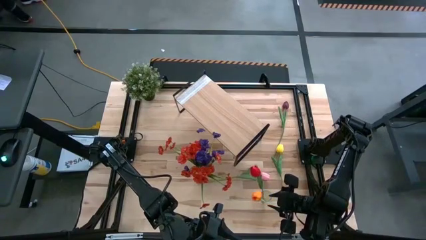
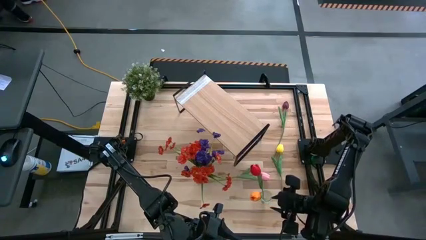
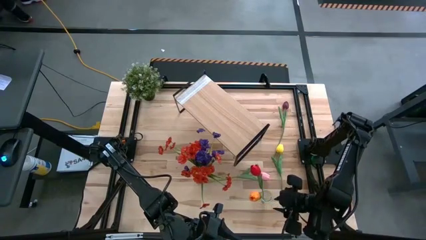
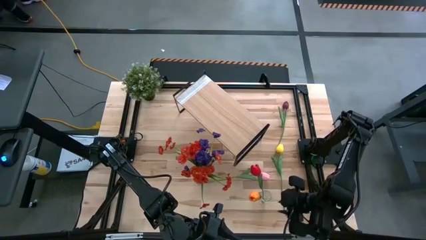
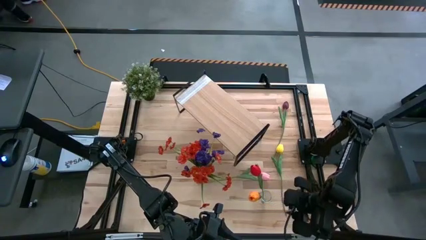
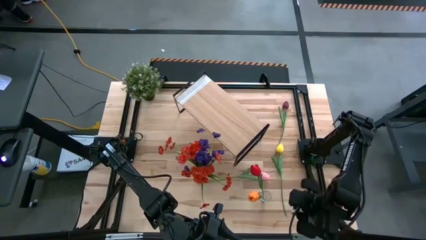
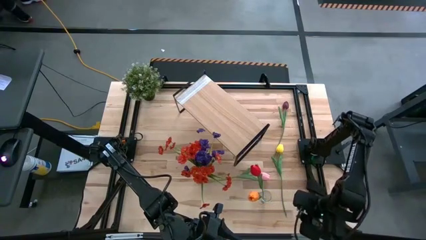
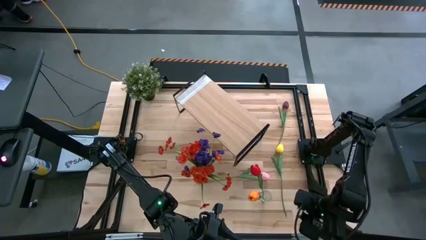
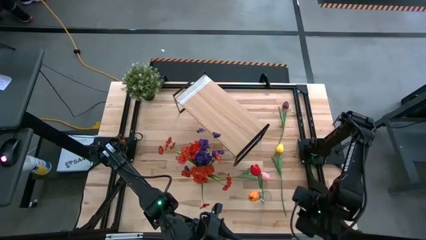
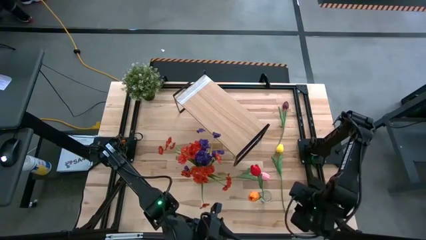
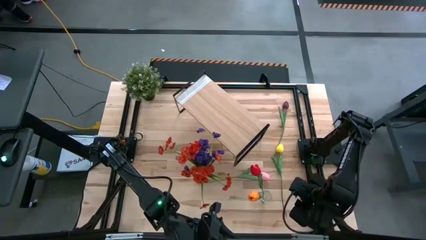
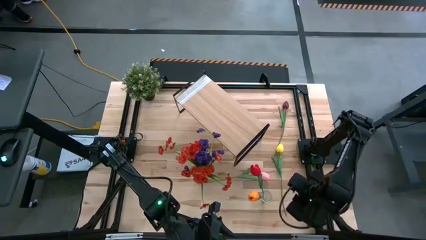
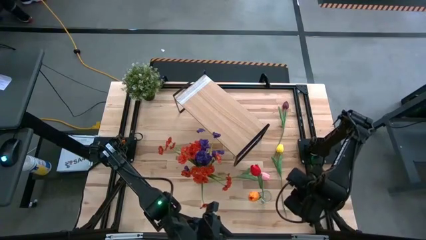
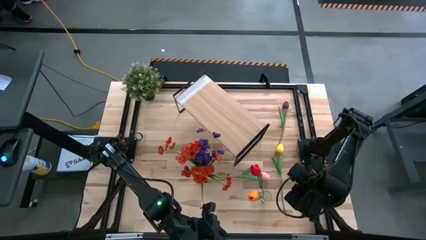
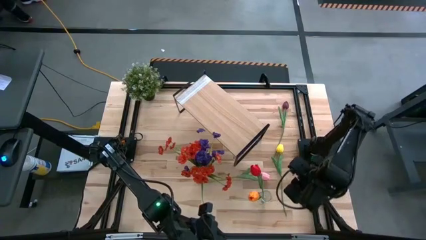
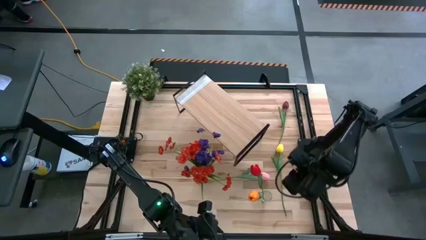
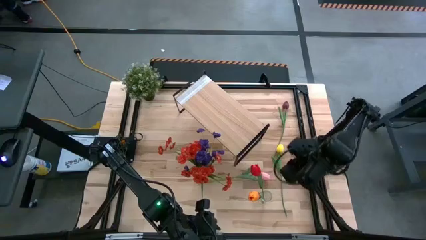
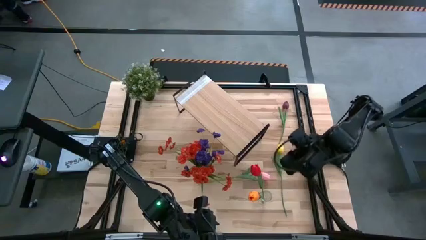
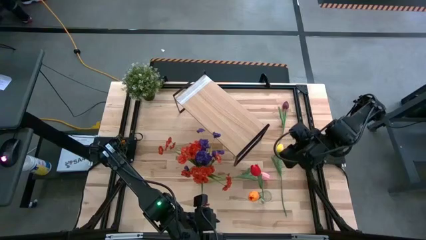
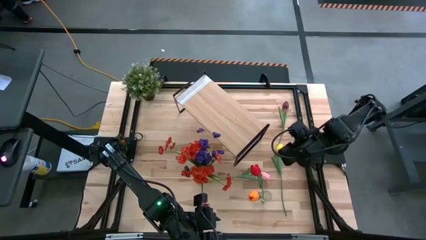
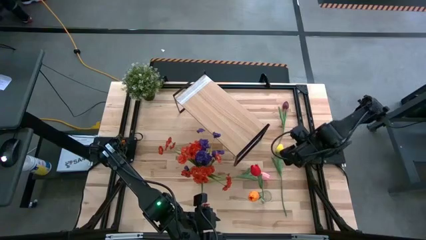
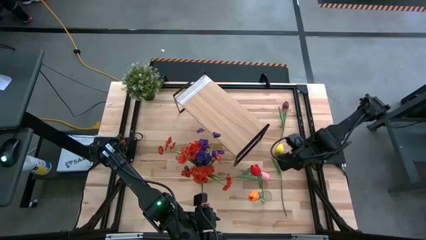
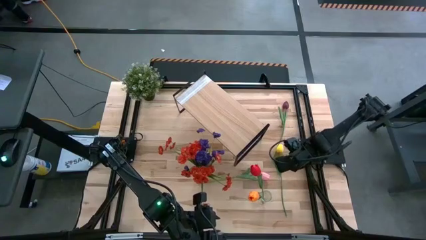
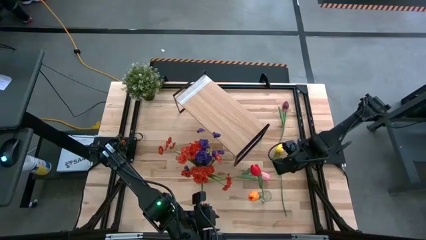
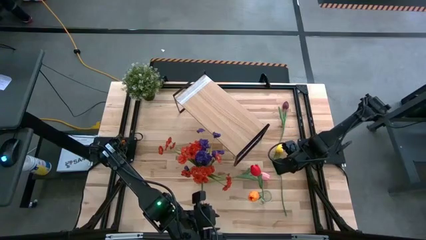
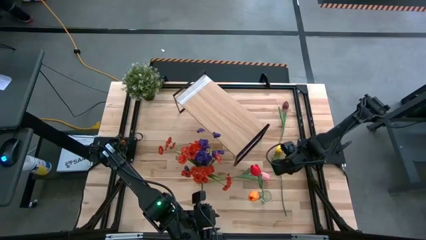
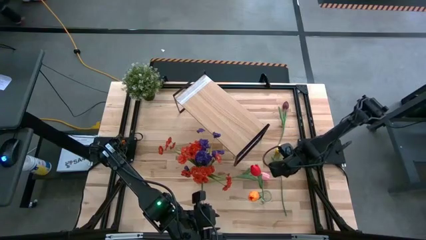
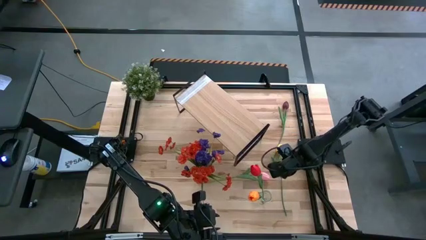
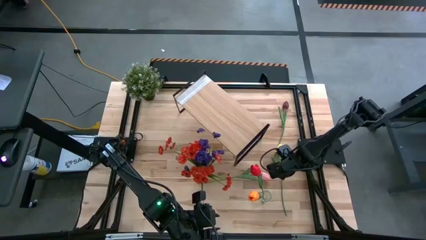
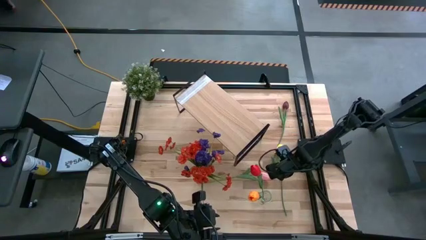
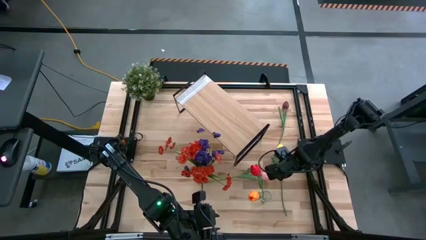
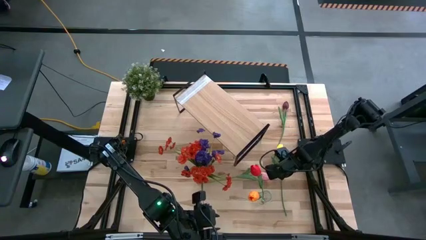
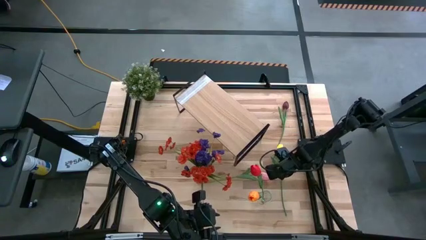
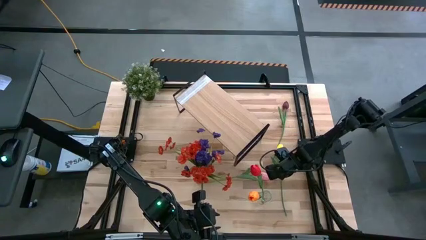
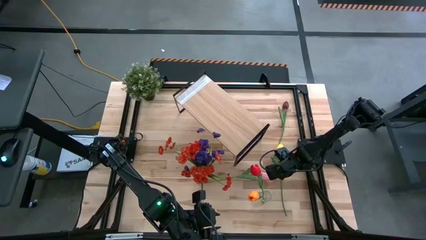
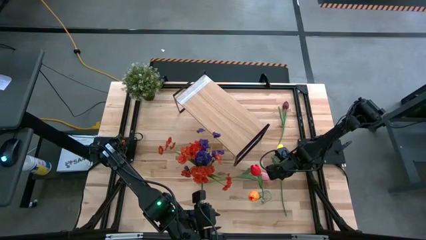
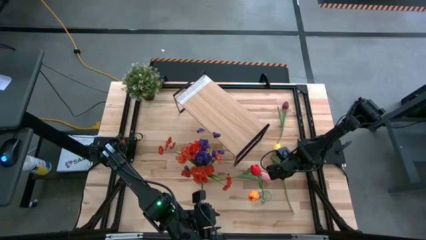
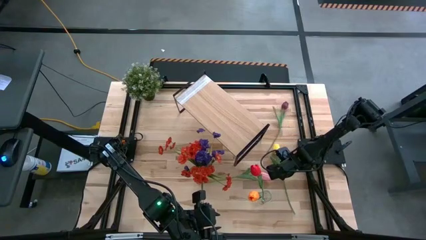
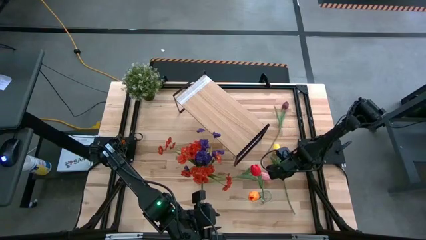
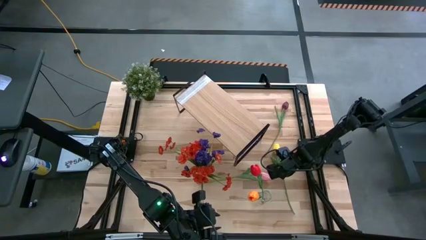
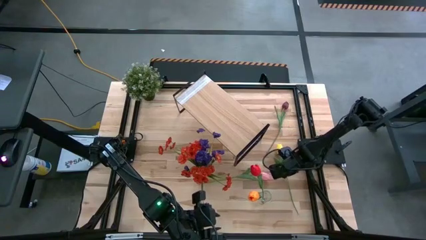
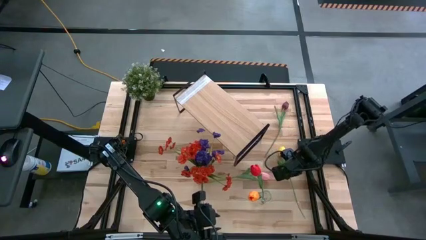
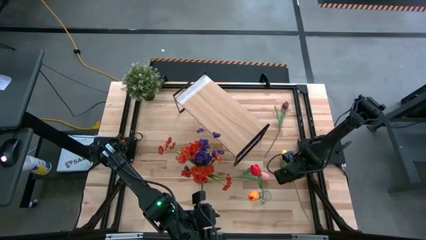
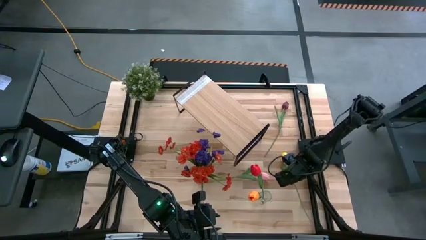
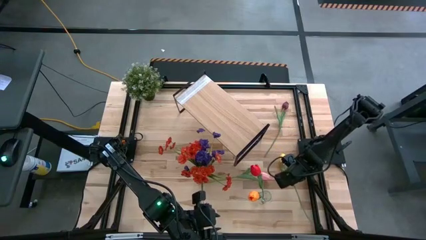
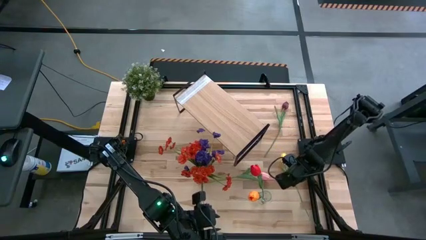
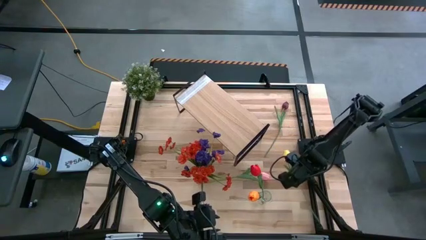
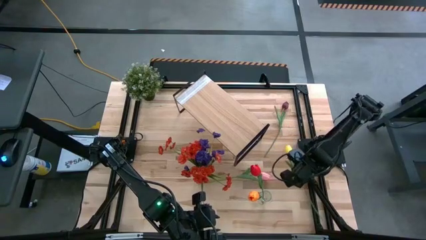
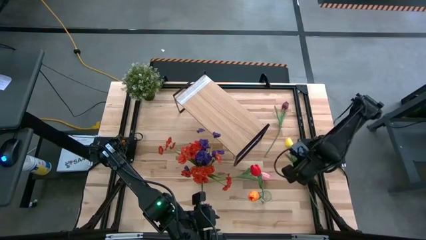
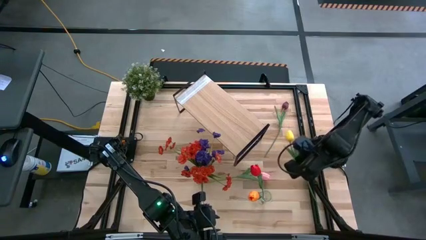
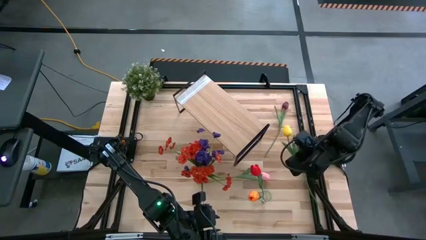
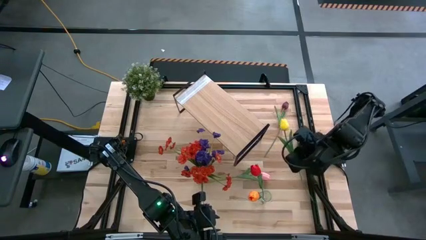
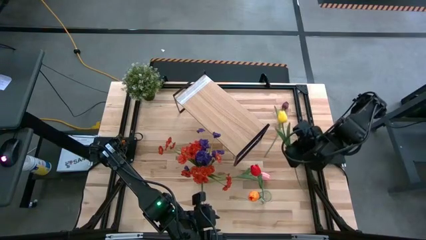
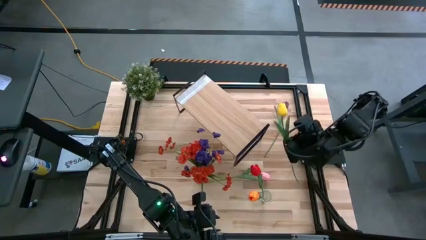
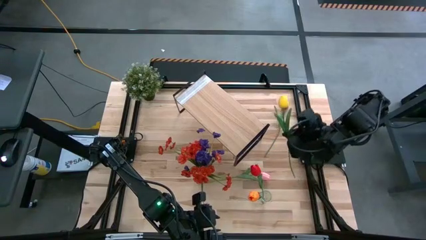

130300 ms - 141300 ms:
Task: Pick and place flowers into a vace then onto a shelf
Put the yellow tulip into the right transparent vase
